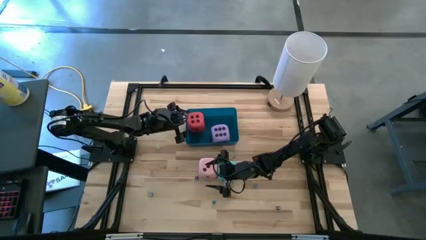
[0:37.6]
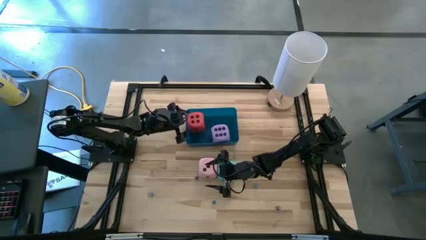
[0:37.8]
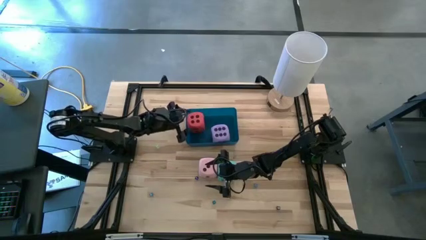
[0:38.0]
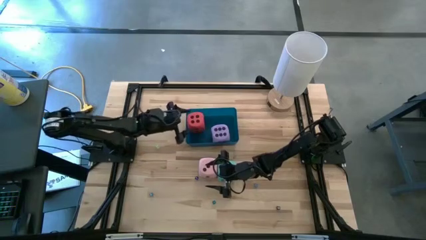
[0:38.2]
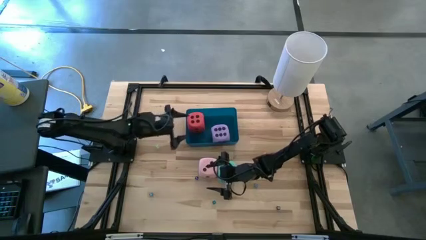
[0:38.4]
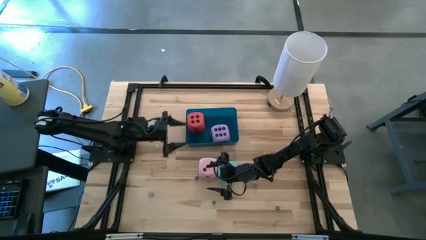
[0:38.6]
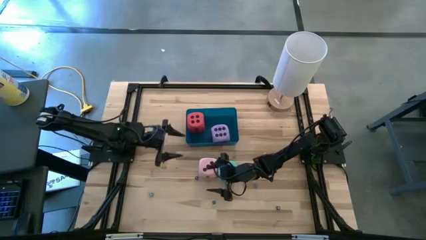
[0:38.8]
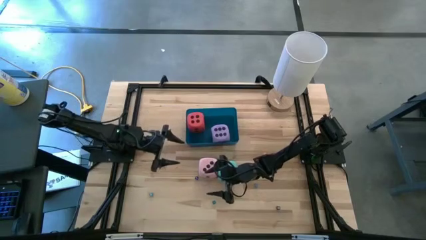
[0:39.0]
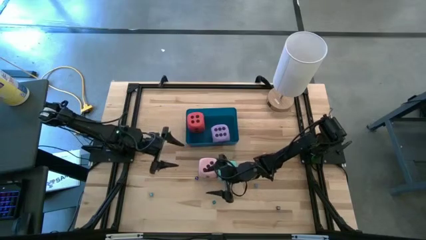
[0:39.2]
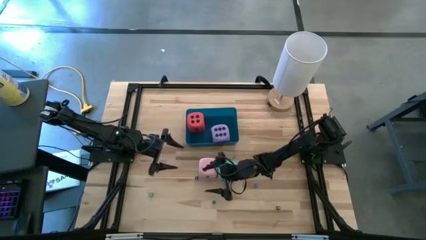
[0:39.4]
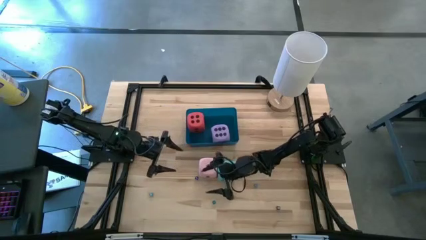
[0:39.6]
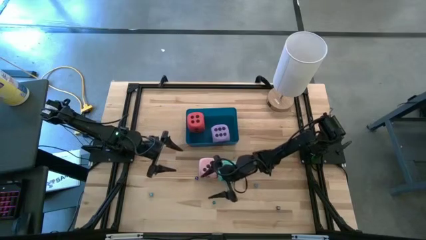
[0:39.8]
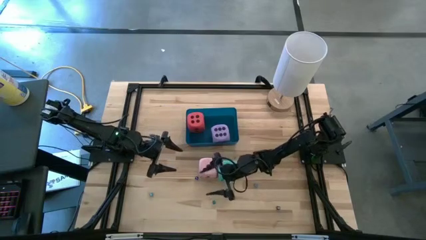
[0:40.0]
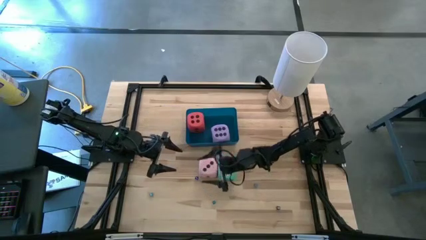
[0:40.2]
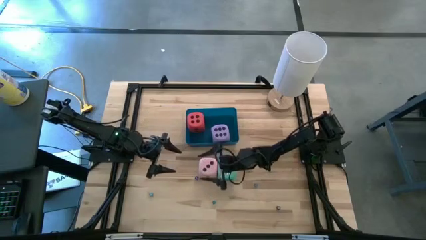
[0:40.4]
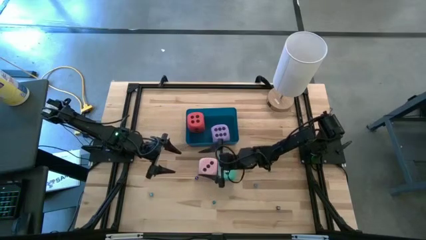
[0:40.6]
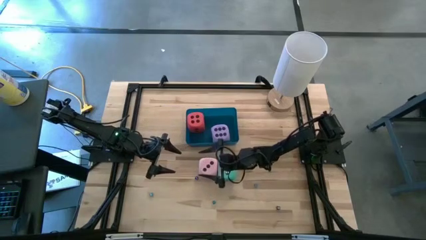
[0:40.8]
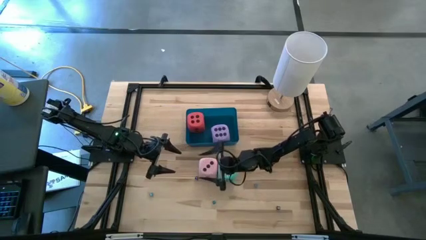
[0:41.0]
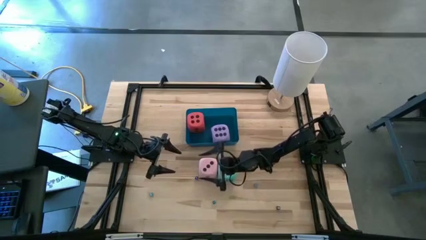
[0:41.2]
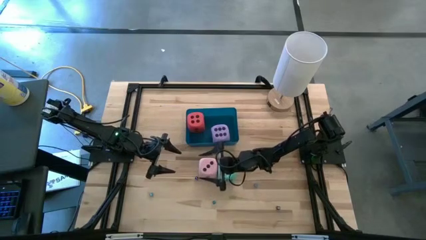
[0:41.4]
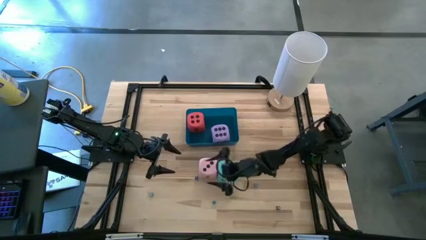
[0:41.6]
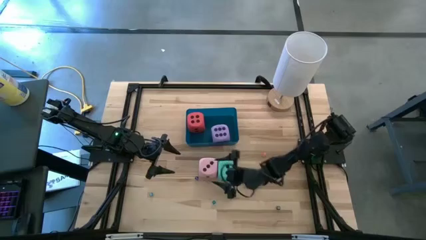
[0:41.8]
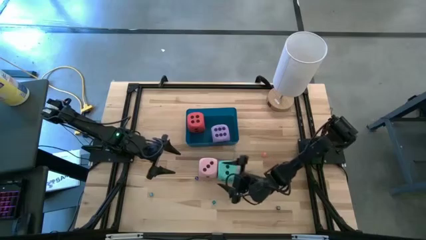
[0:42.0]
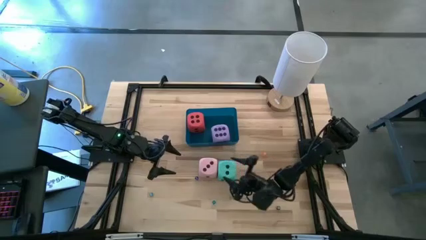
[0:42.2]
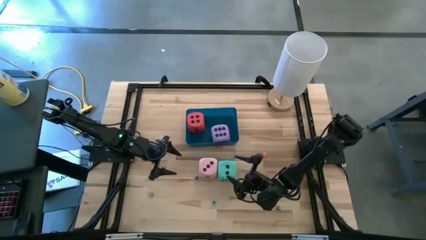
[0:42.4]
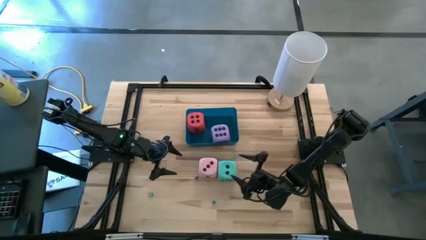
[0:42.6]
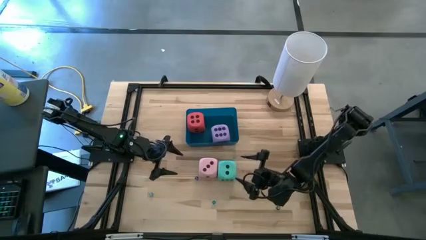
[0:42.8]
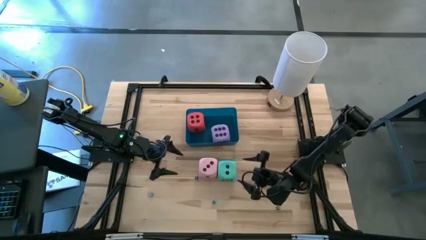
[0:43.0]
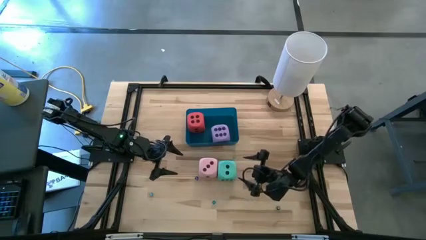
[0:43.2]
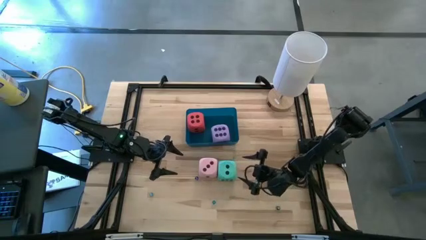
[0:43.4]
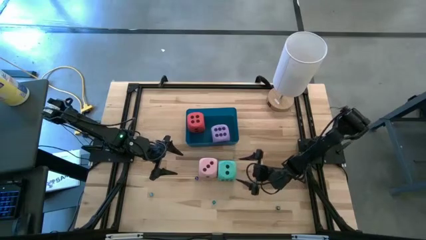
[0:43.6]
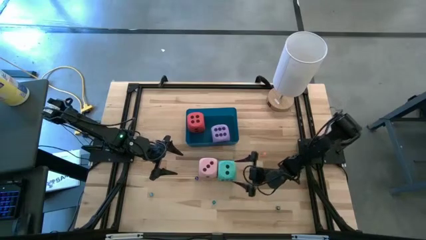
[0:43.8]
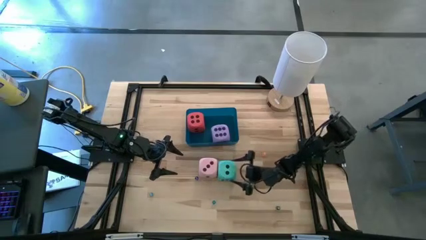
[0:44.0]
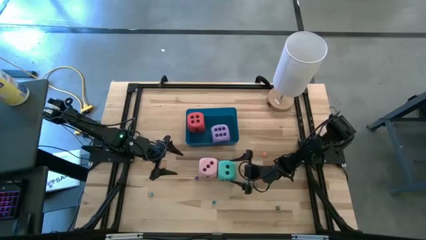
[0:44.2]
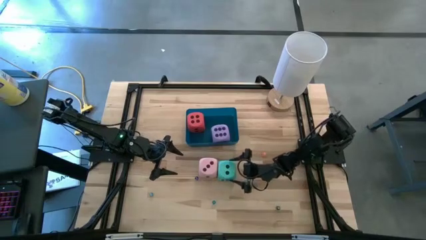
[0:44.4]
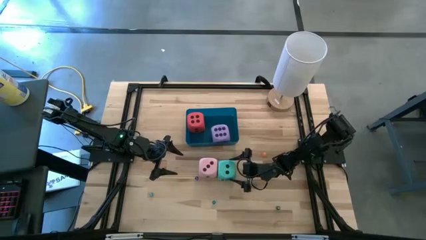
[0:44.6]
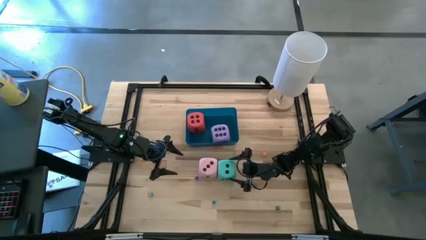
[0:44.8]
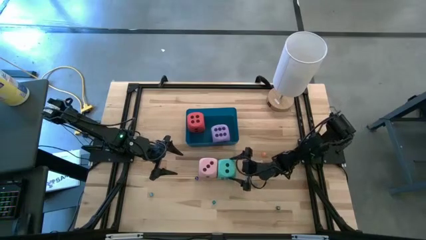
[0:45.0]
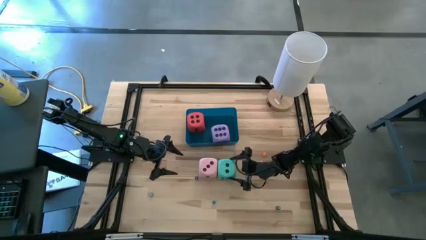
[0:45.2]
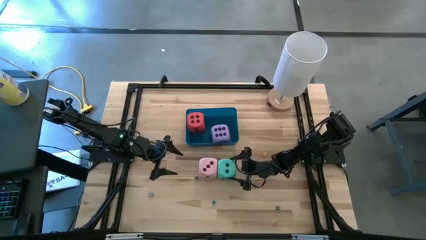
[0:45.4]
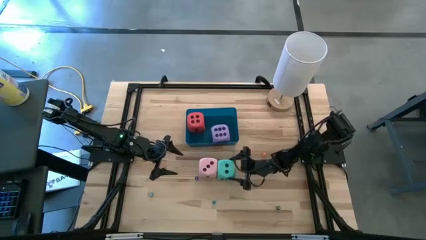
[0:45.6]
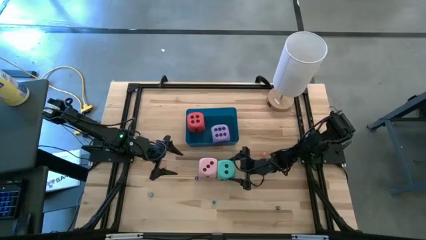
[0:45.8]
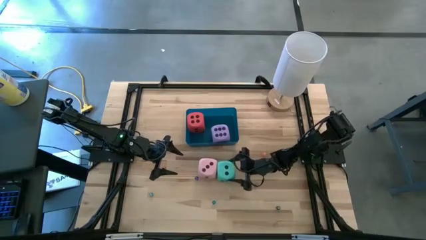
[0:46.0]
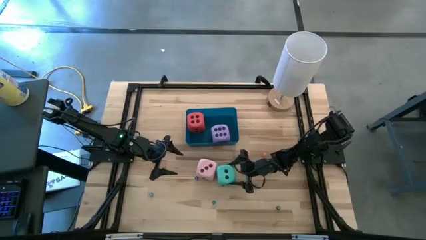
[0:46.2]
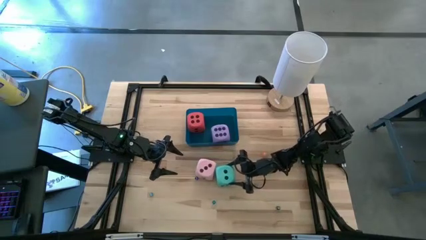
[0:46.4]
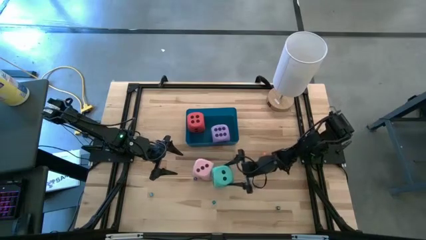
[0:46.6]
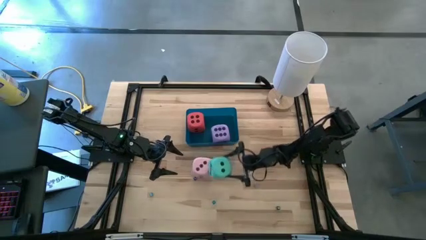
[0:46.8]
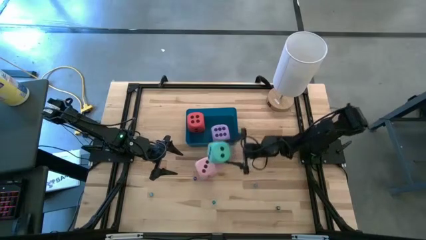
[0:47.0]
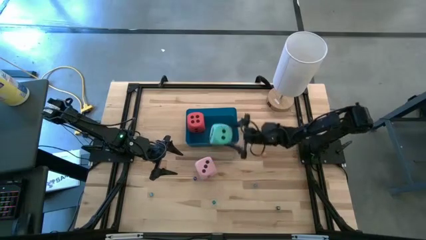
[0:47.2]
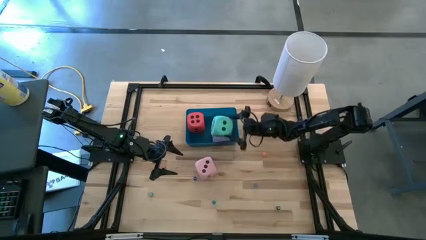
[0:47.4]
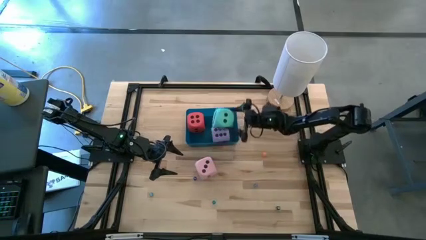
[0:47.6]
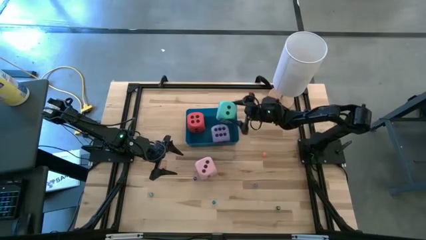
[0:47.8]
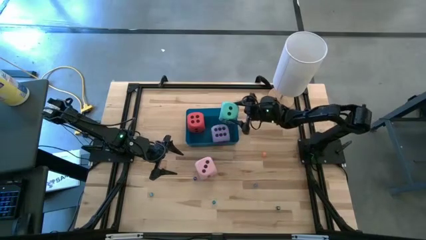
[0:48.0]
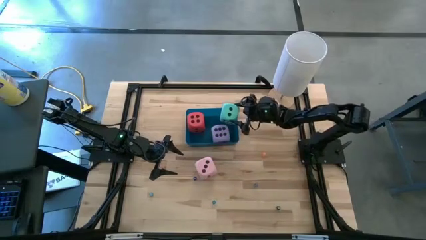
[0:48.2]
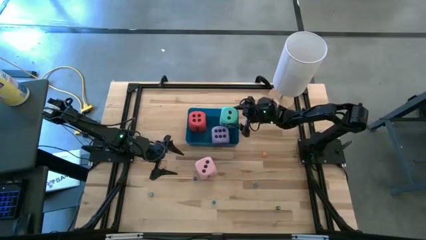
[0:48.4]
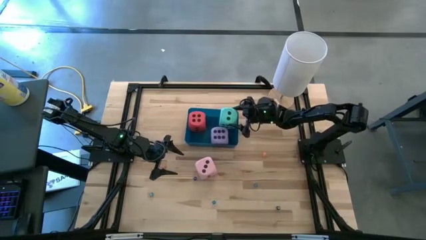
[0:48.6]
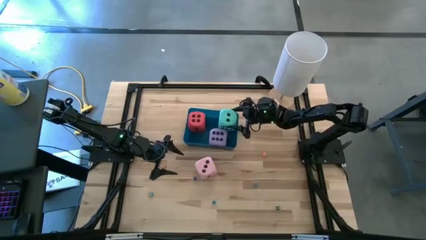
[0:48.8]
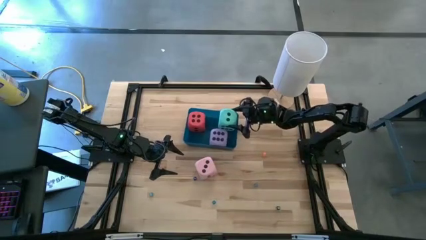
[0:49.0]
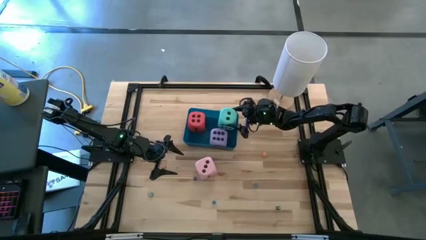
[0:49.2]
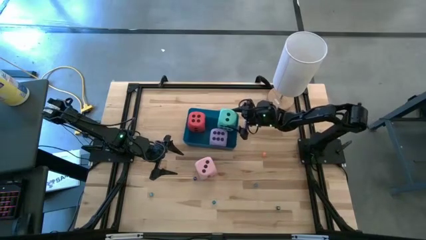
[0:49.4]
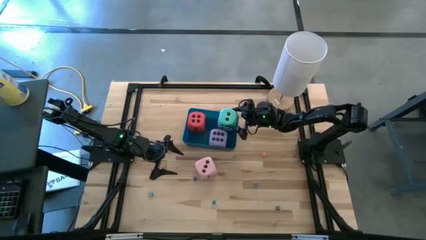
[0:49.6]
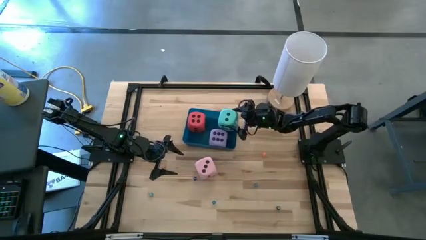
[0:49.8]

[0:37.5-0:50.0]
Task: Pick & Place Dice
Put the blue green die into the blue bin
